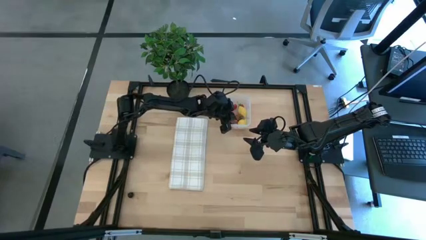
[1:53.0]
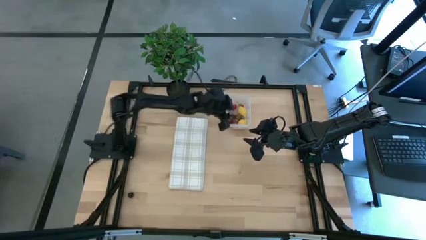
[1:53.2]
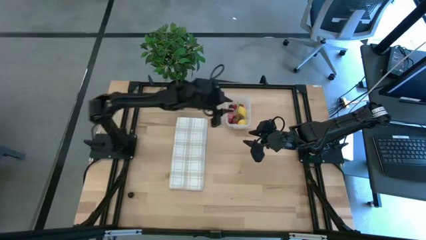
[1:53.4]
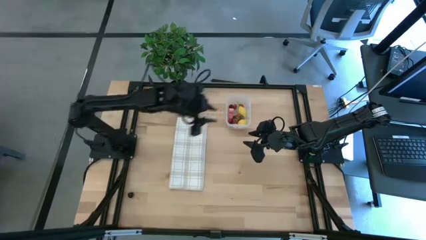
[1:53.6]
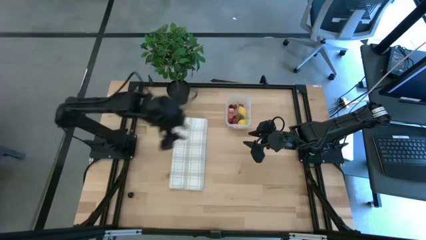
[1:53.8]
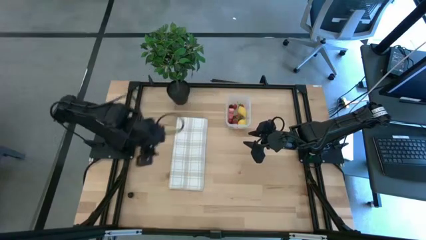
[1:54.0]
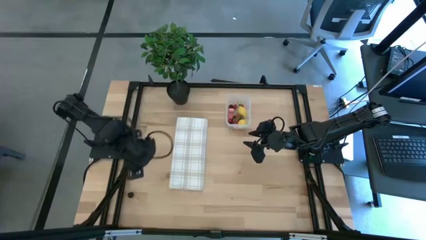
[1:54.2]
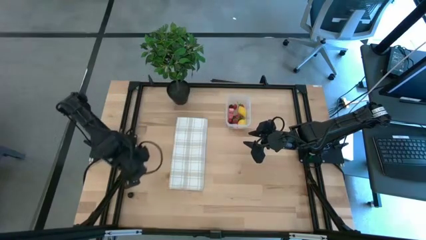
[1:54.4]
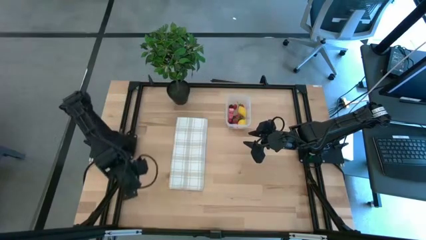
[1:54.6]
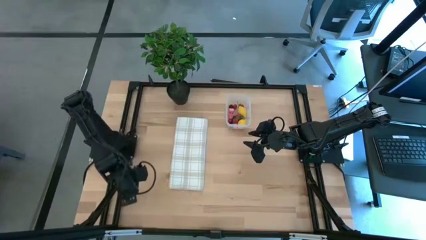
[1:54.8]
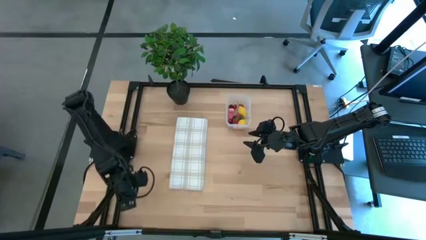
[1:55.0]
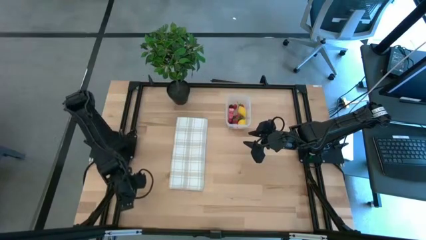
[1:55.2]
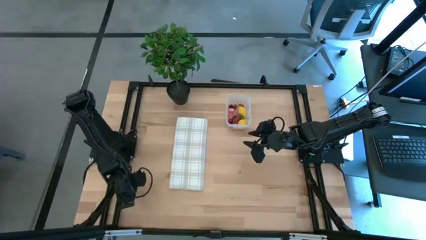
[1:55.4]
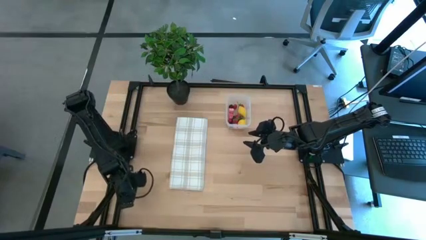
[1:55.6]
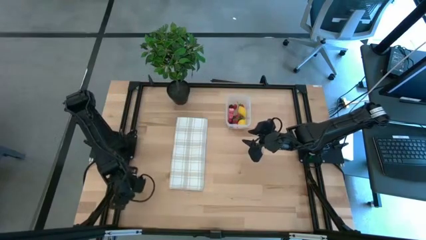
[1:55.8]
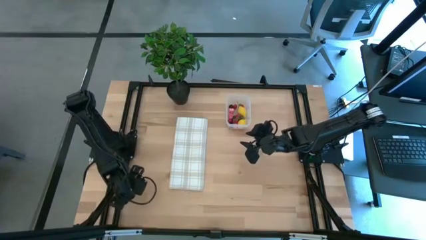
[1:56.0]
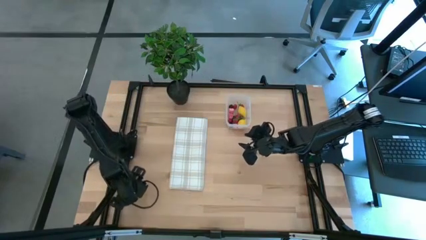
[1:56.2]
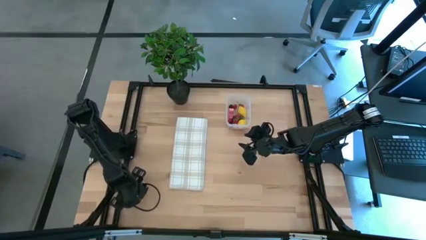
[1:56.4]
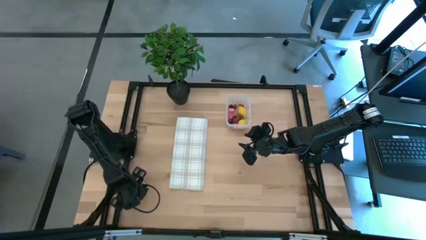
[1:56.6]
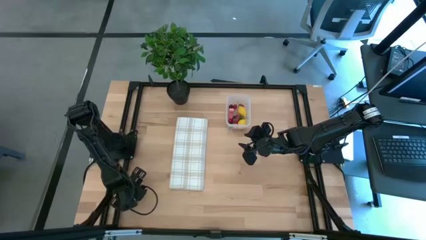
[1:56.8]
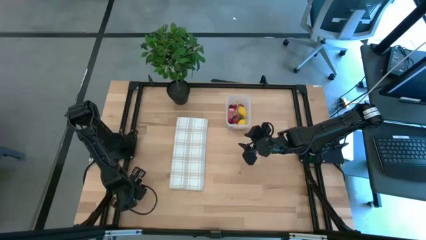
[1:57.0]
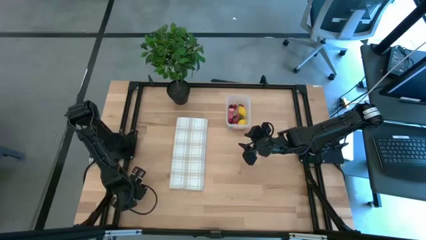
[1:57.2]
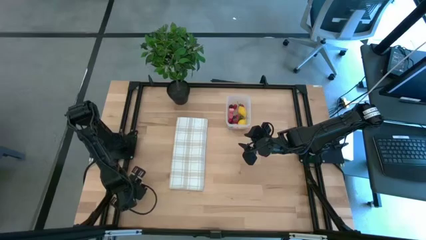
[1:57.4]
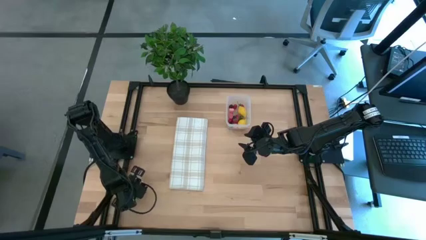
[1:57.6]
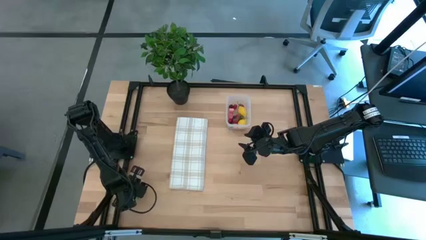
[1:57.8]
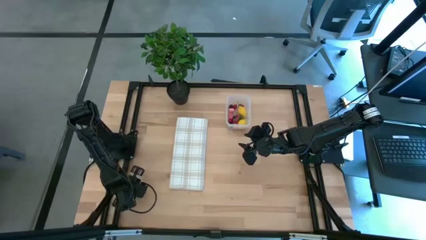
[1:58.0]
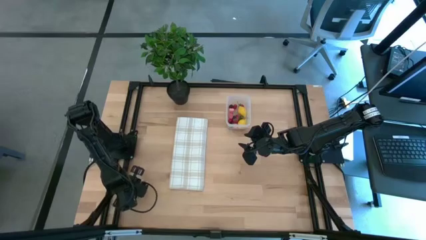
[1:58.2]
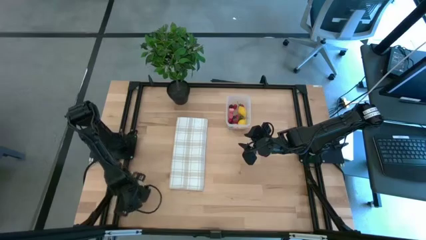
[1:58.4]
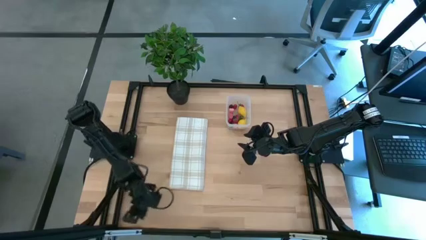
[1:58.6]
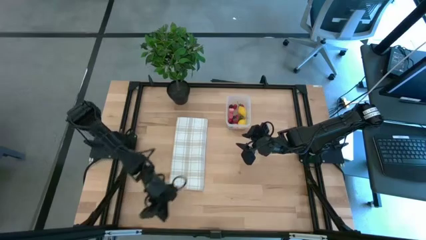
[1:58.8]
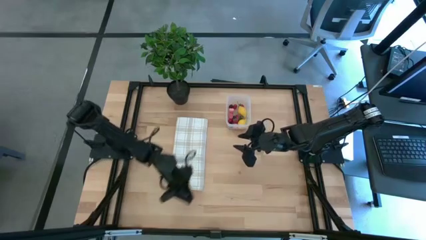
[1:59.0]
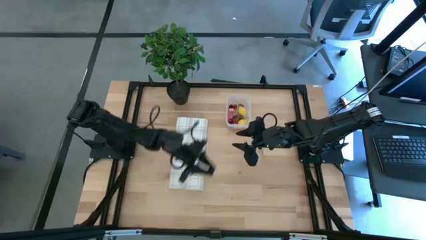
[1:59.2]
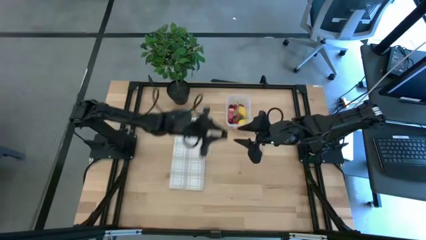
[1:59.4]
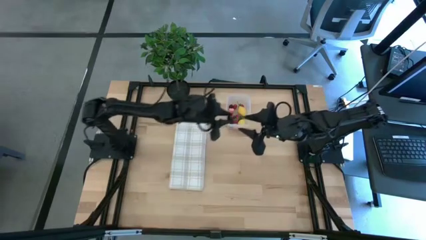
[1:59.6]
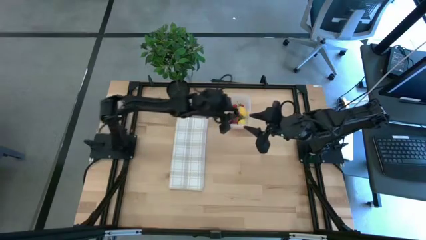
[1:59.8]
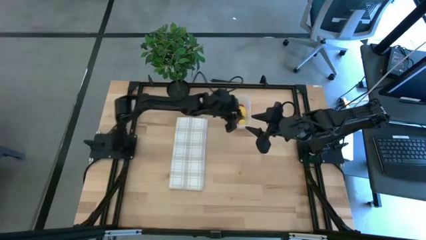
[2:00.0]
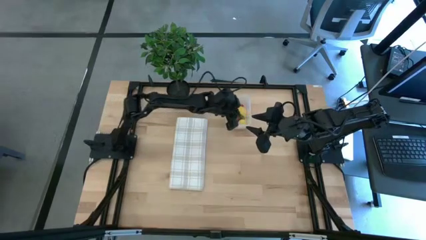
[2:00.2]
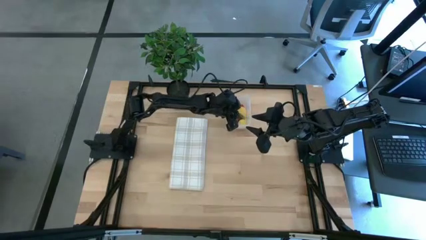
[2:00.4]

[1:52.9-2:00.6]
Task: Pick and placing Produce into tupperware
Put the black cherry into the transparent bin

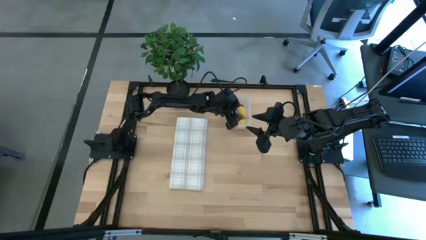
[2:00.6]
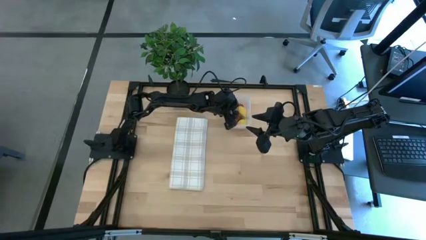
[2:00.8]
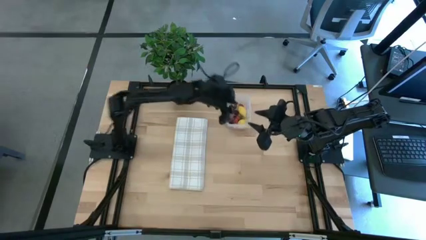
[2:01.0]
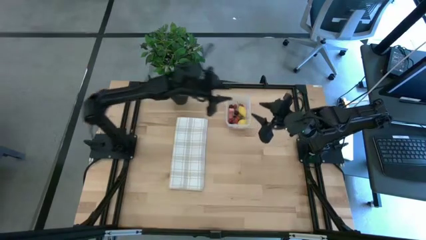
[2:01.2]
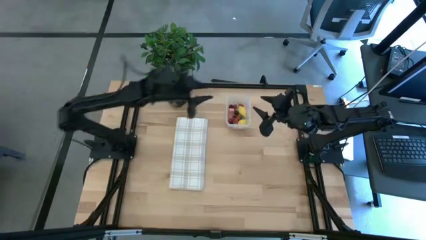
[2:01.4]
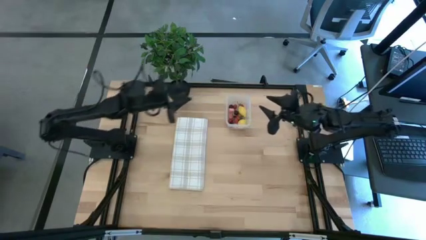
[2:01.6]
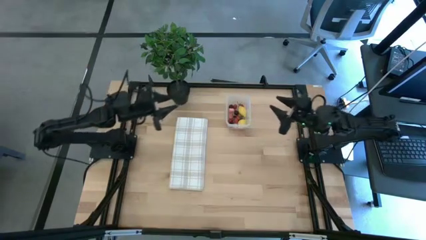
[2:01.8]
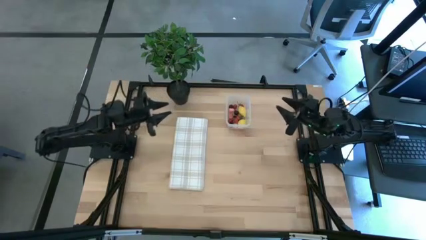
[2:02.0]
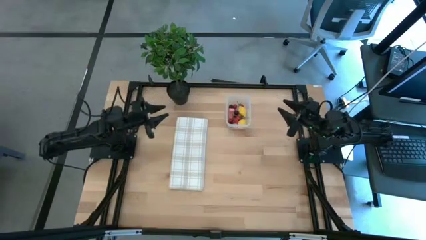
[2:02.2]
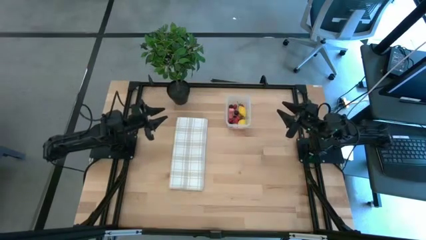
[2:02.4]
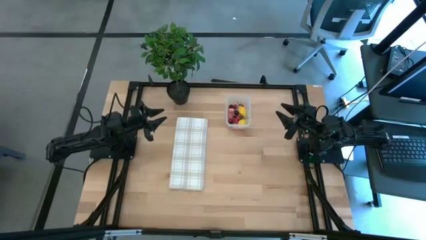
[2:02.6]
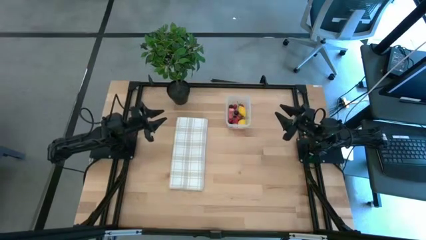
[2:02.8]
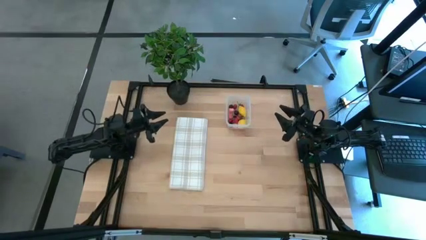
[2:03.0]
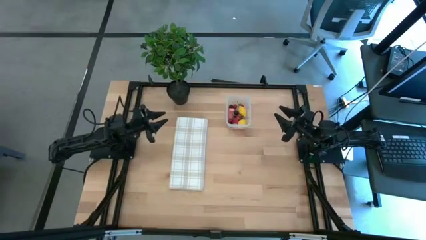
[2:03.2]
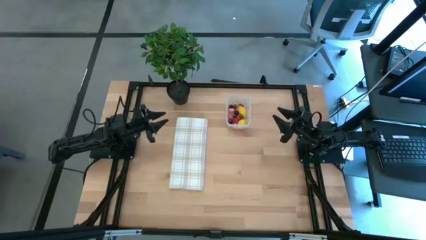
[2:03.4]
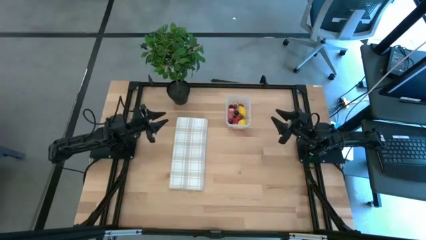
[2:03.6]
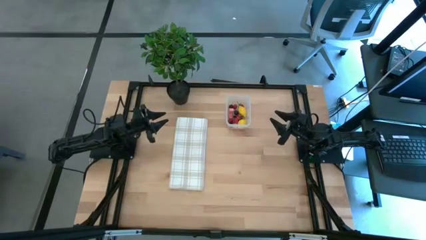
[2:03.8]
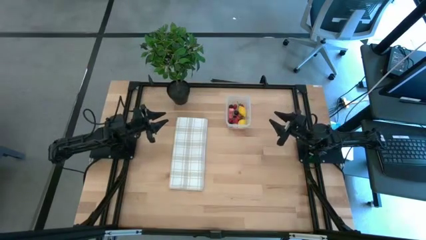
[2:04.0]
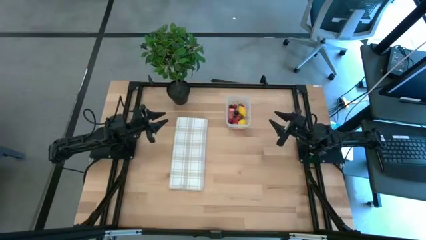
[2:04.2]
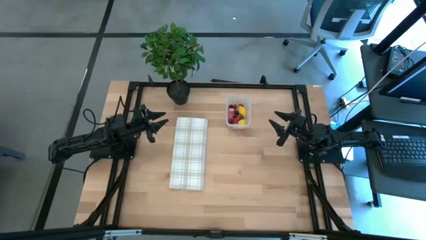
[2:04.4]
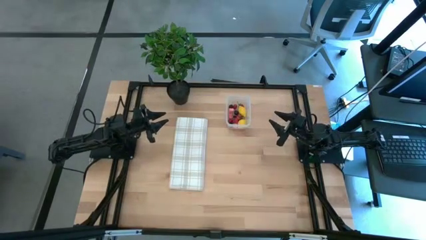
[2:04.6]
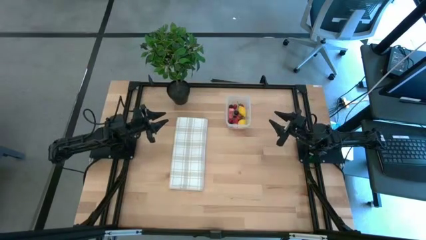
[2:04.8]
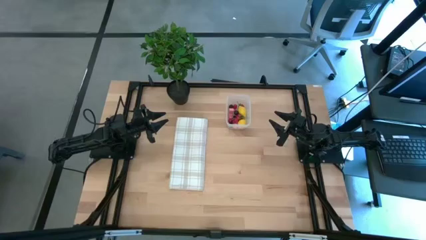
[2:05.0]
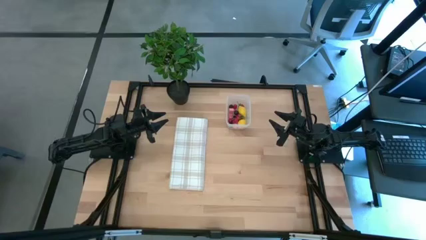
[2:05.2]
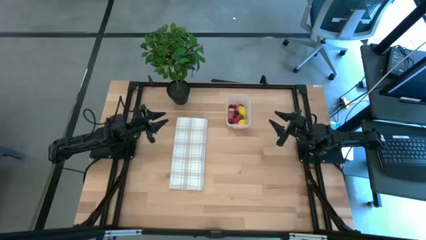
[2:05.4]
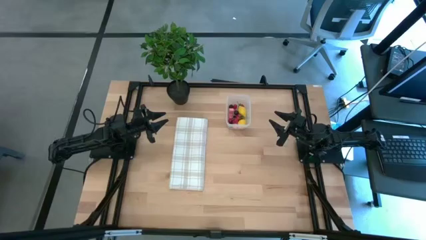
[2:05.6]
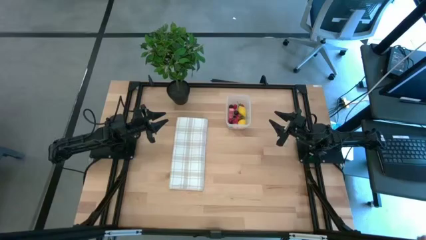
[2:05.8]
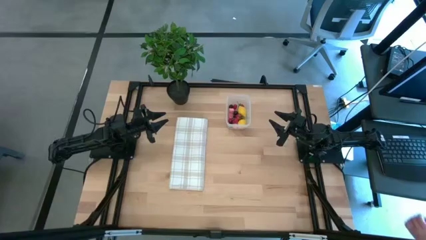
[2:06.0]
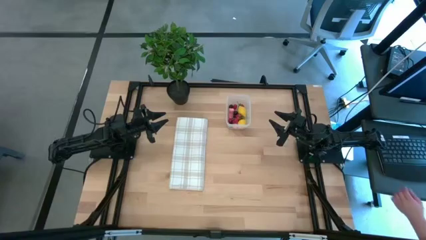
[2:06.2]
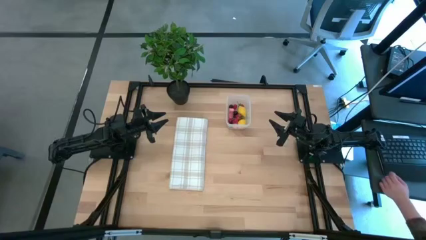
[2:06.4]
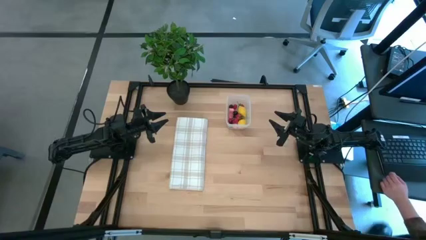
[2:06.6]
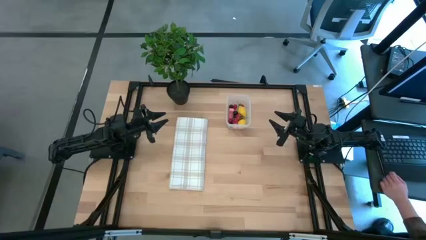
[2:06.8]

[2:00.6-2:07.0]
Return to Home Position
